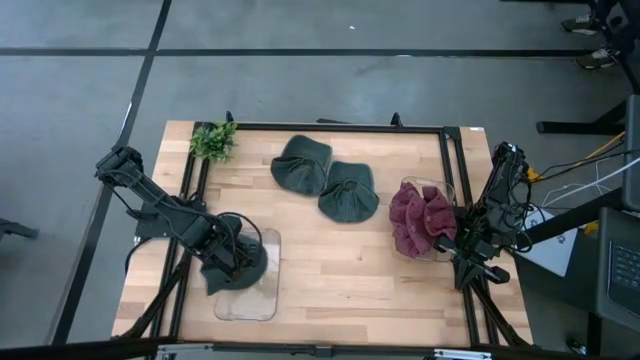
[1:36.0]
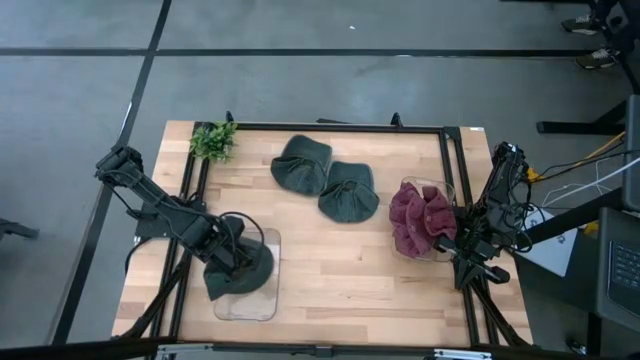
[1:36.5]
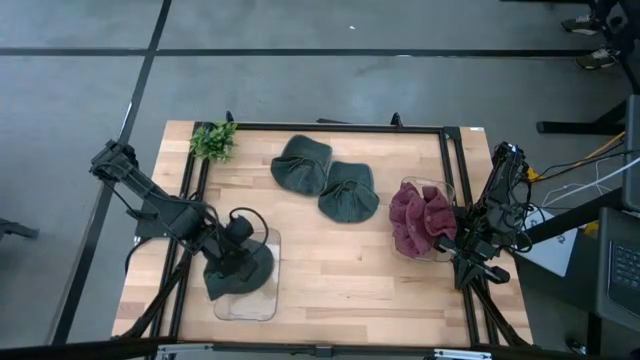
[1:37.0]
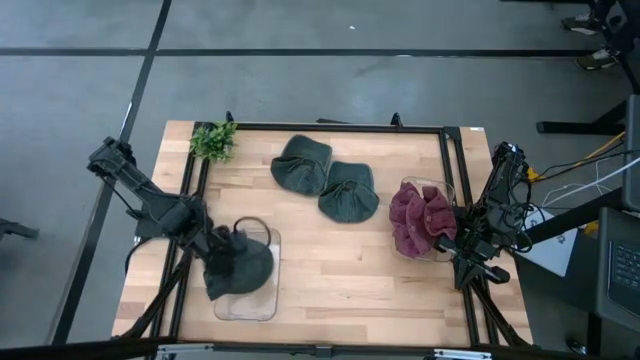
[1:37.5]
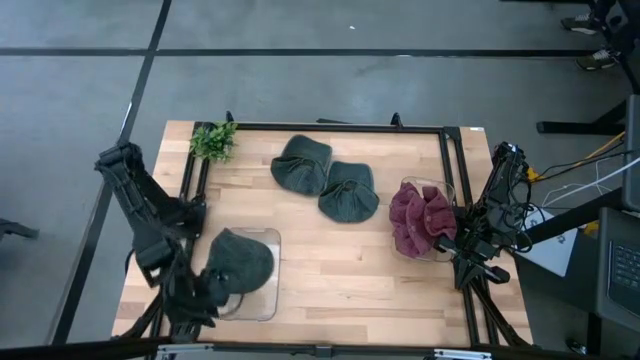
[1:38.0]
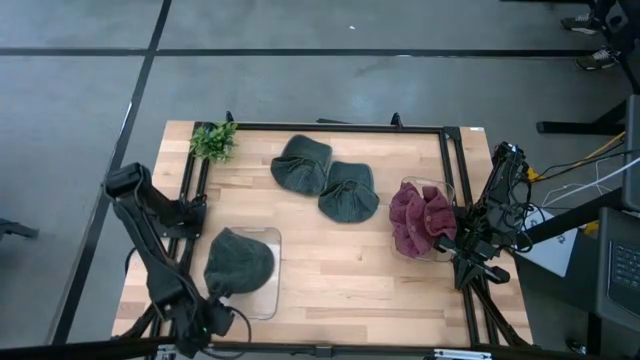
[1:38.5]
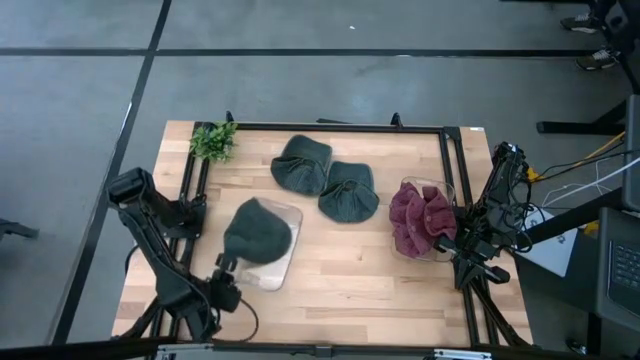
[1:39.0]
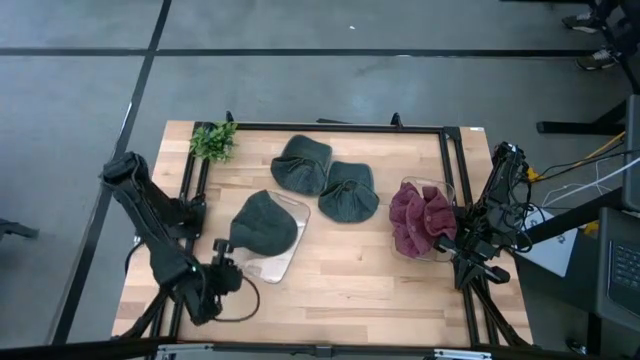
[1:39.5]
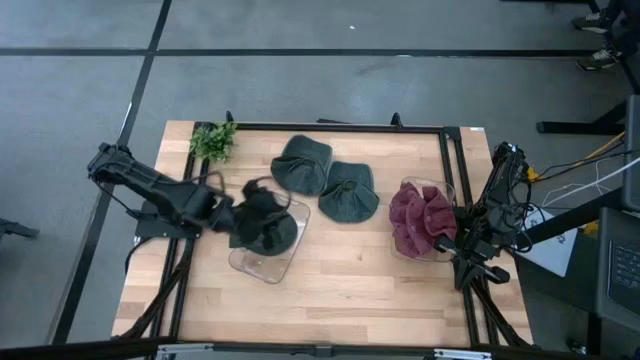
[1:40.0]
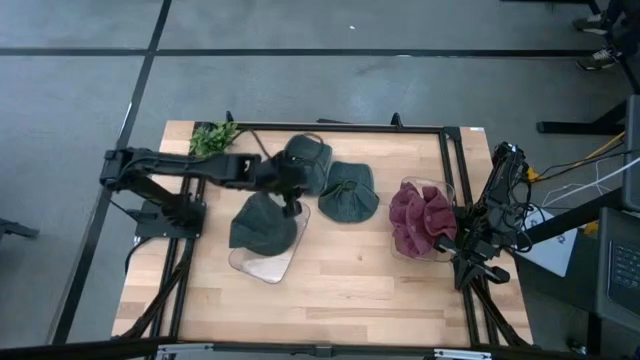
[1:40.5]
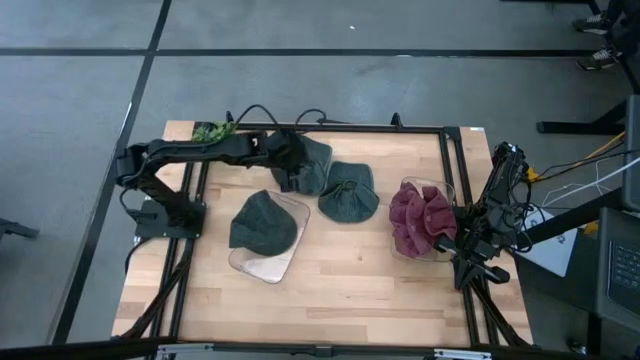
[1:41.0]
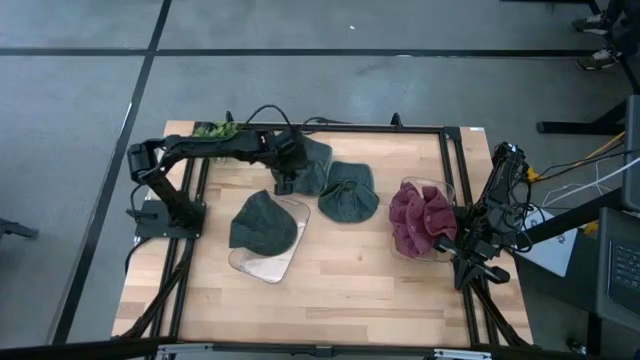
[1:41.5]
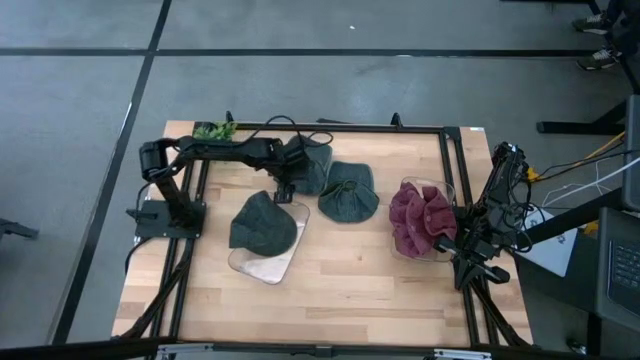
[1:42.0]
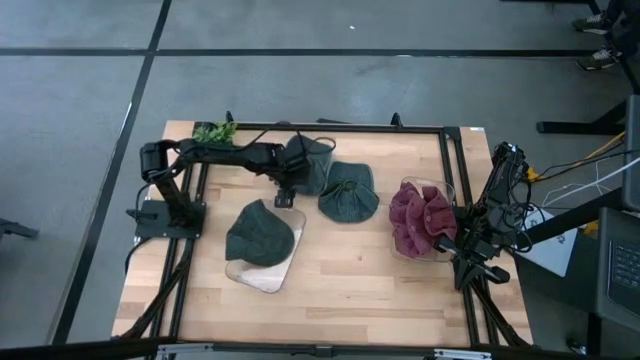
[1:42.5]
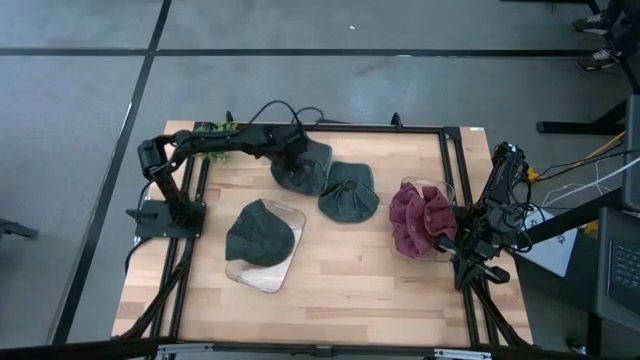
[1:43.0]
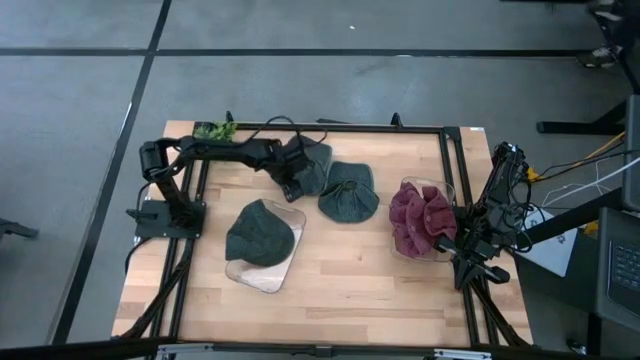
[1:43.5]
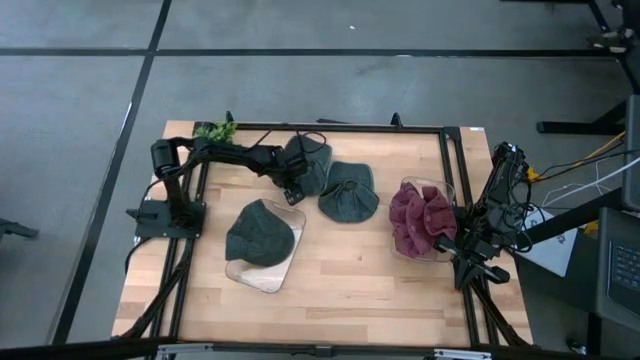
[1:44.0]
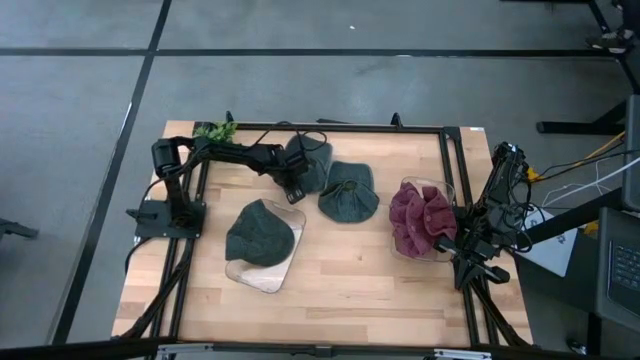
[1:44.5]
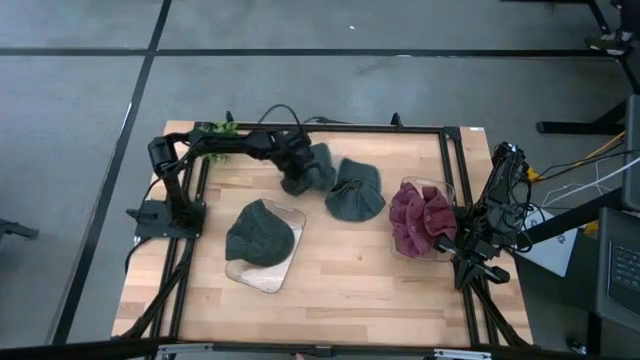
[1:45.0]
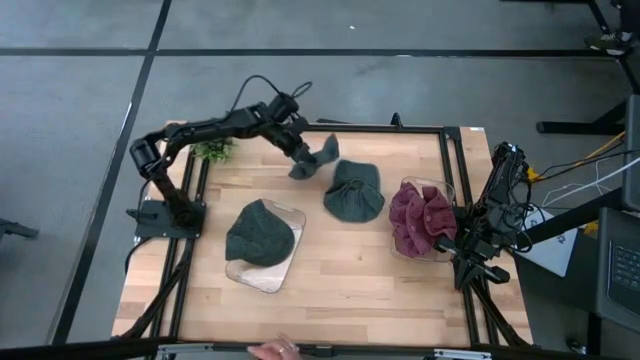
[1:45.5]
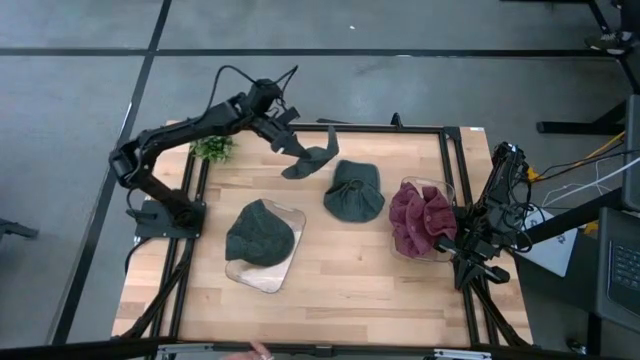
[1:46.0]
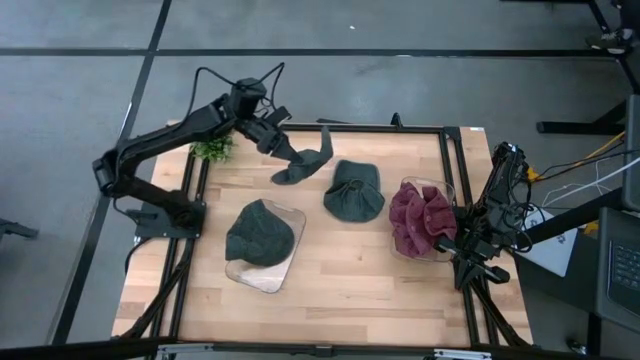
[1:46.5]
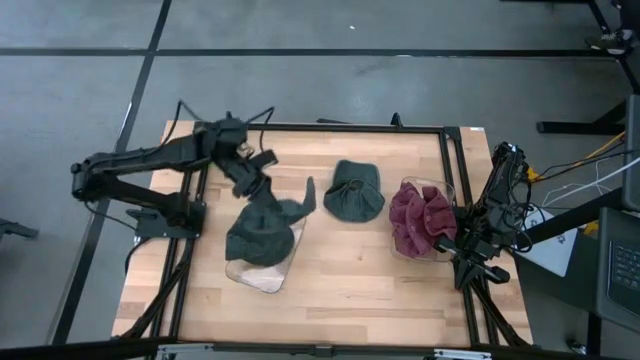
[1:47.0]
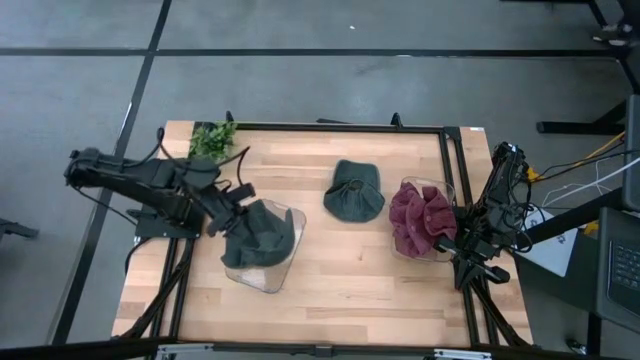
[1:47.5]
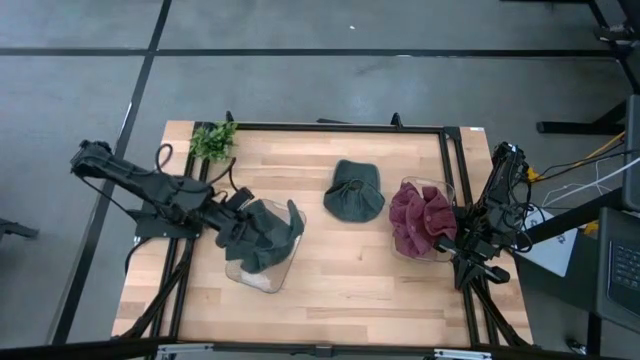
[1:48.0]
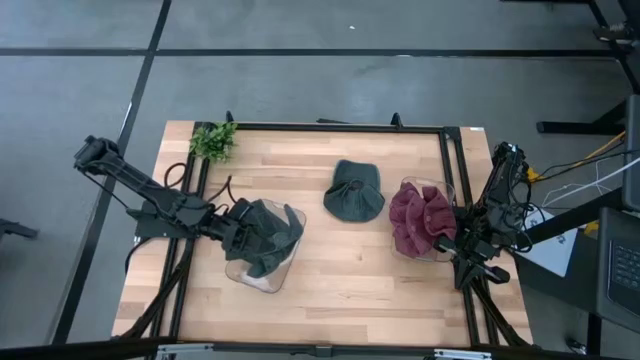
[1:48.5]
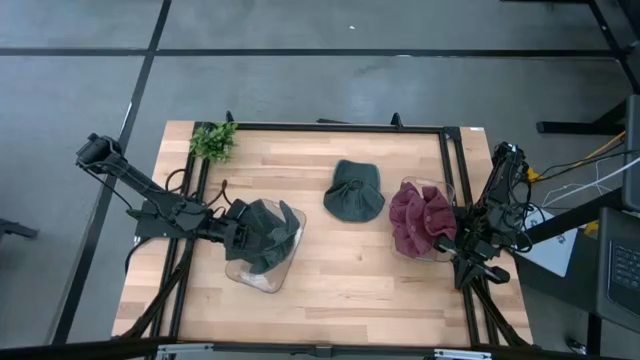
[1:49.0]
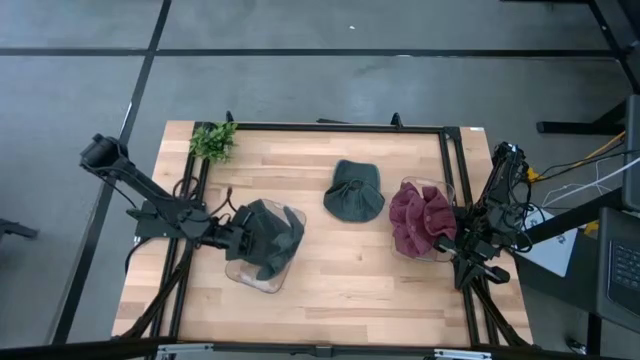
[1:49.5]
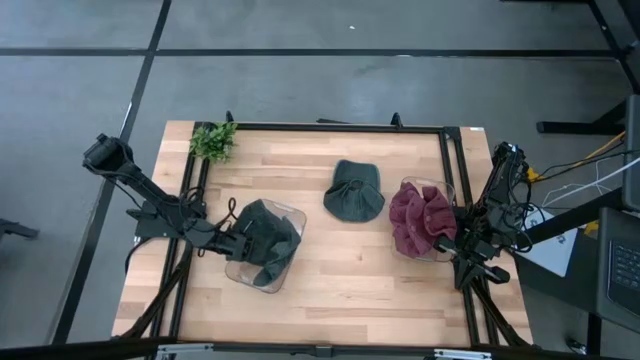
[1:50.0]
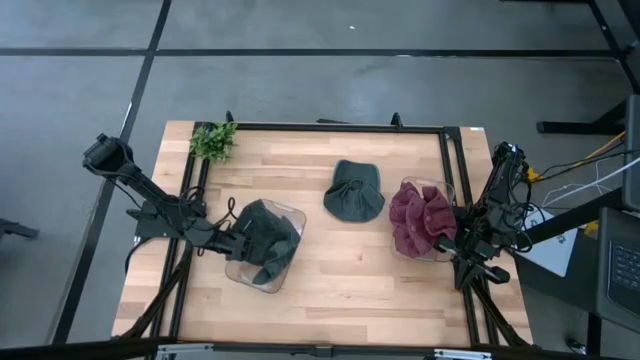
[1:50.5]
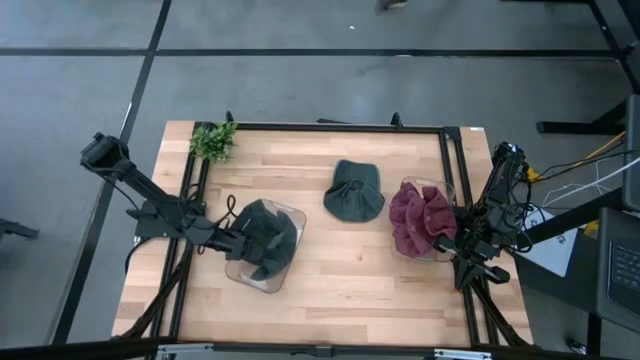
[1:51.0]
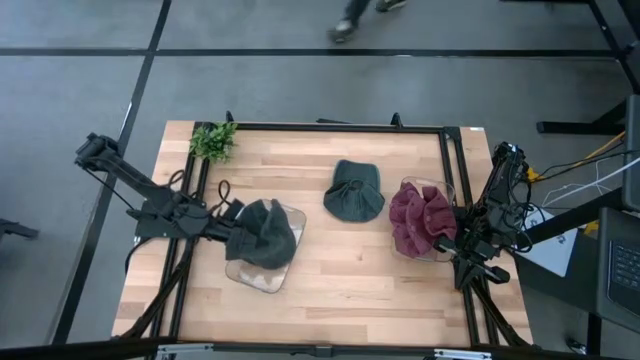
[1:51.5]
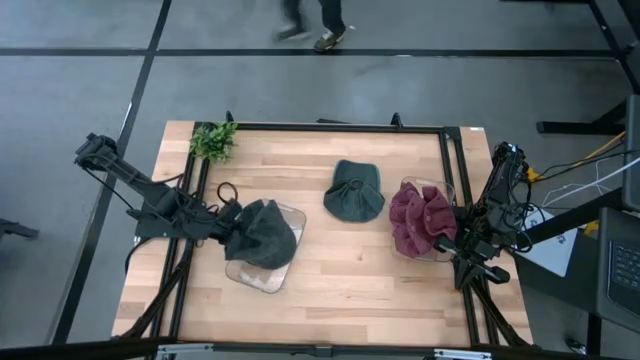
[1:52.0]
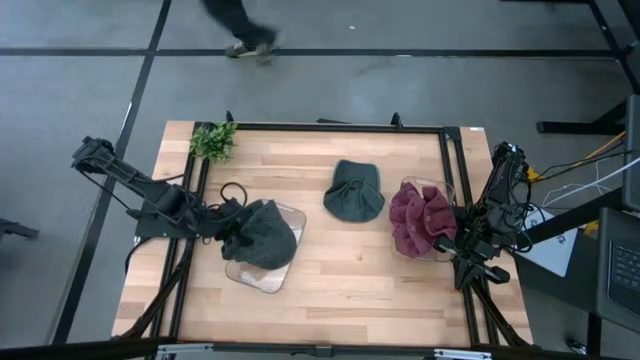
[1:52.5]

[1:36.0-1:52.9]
Task: Pick & Place hat
Put the left black cap into the left transparent bin

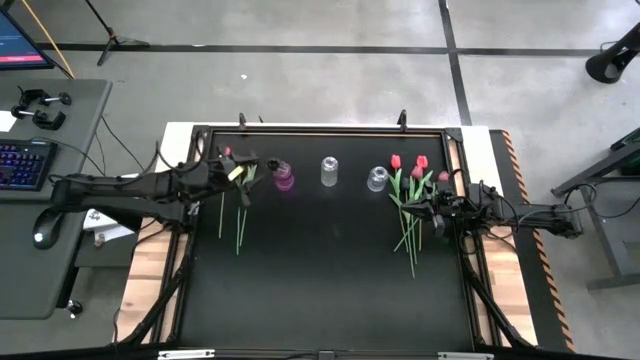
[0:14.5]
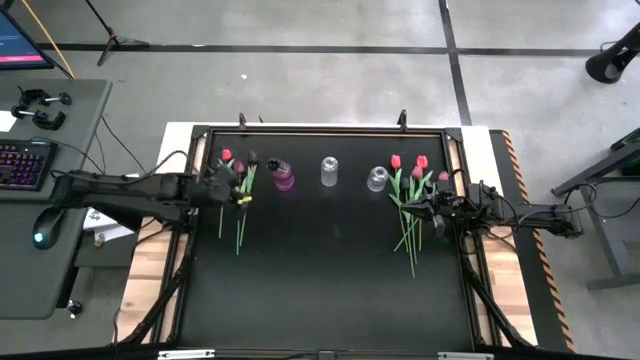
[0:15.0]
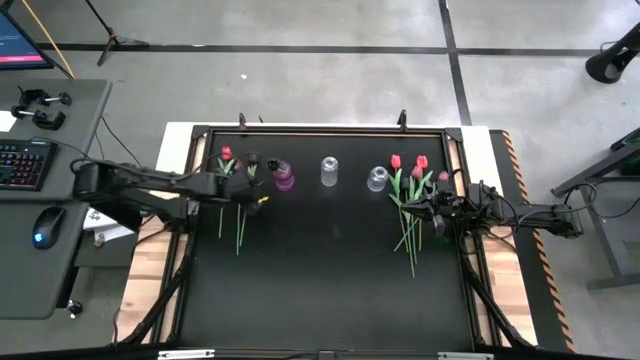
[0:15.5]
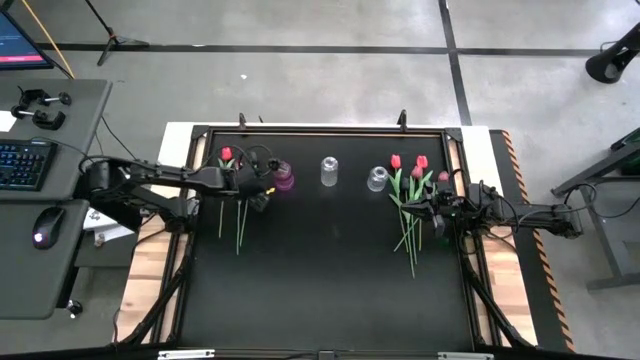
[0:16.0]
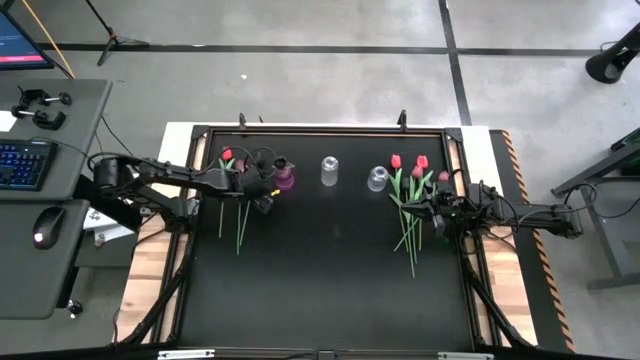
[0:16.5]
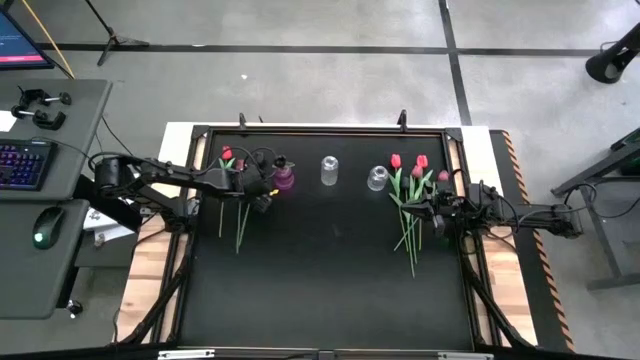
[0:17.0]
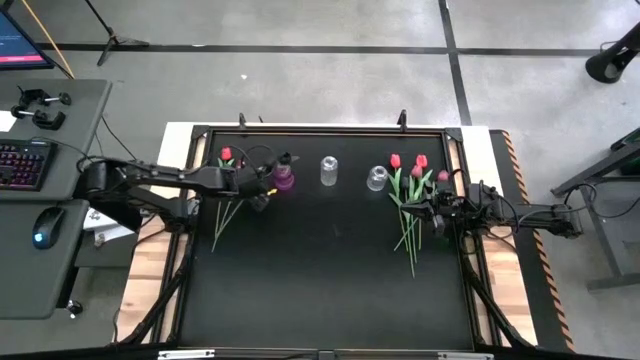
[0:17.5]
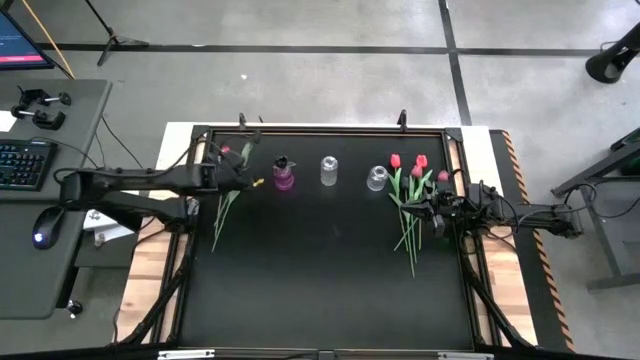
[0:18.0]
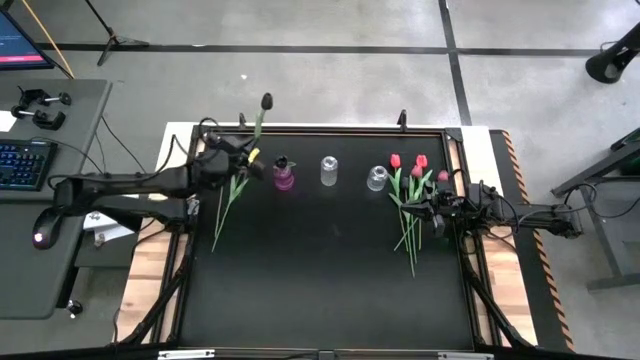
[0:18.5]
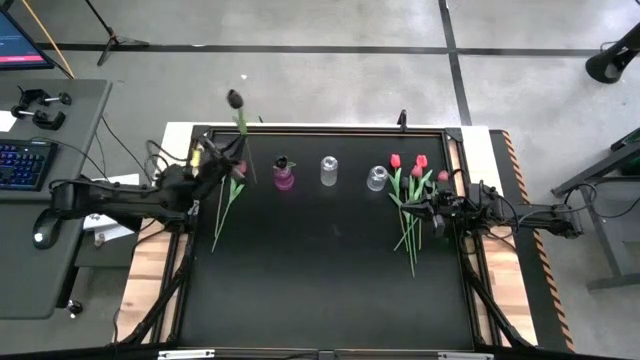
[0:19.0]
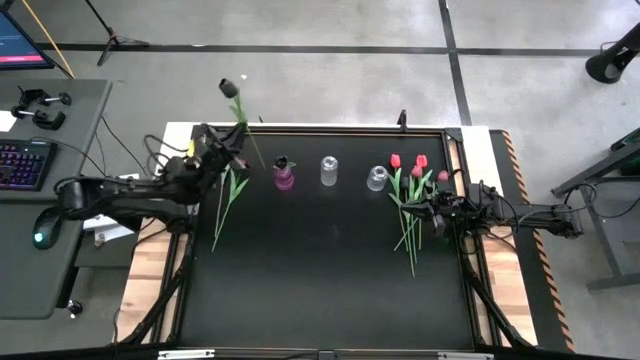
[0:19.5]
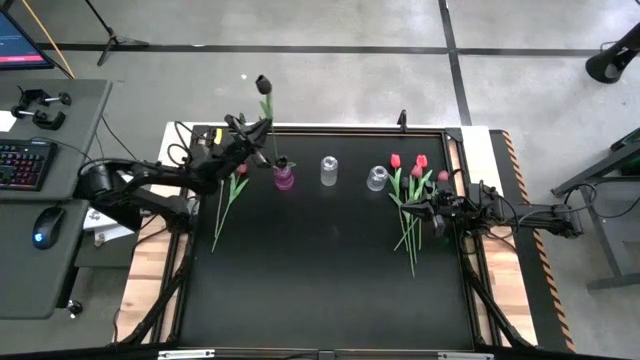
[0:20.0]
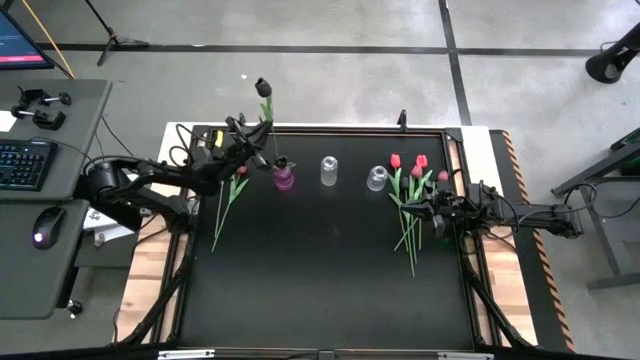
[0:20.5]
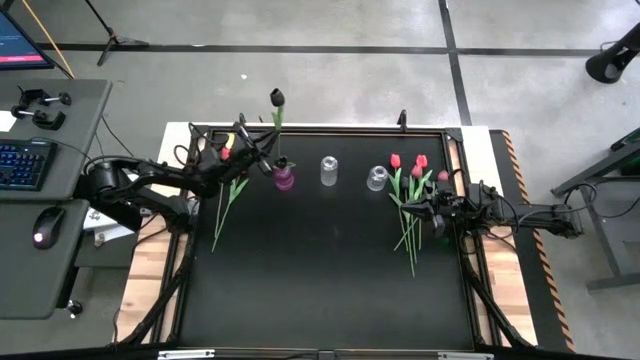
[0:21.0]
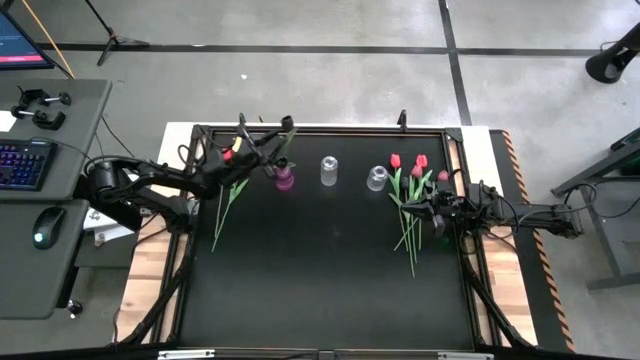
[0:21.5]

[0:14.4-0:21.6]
Task: Sort flowers into vase by color
Put the left black tulip into the violet vase
